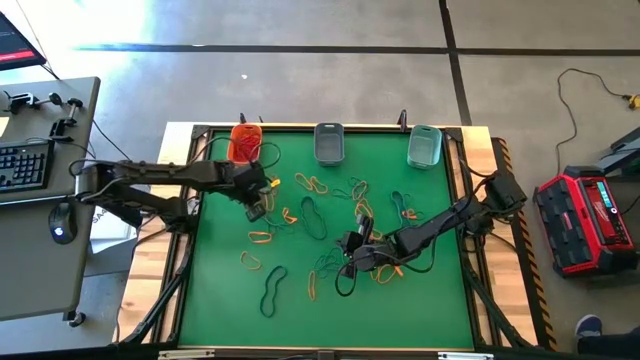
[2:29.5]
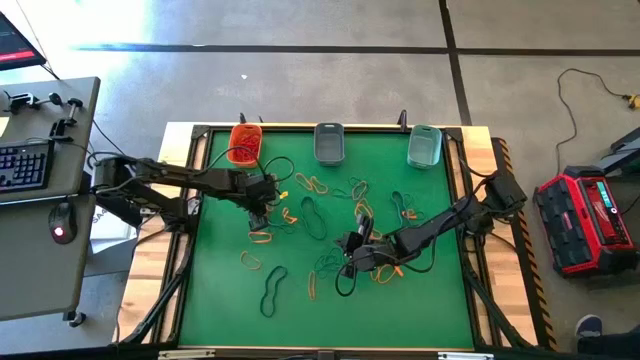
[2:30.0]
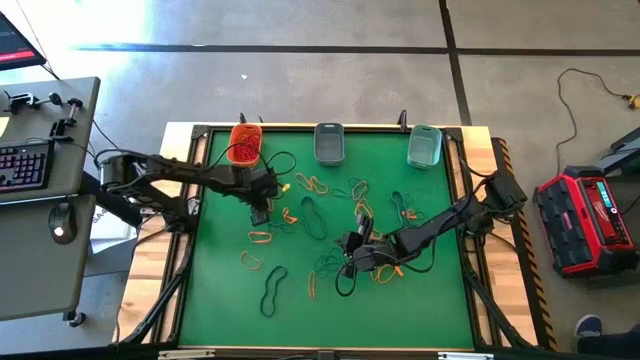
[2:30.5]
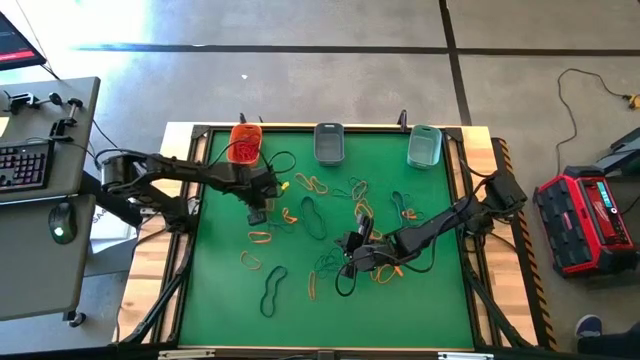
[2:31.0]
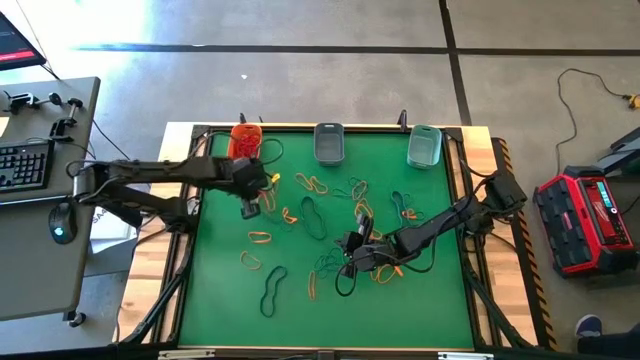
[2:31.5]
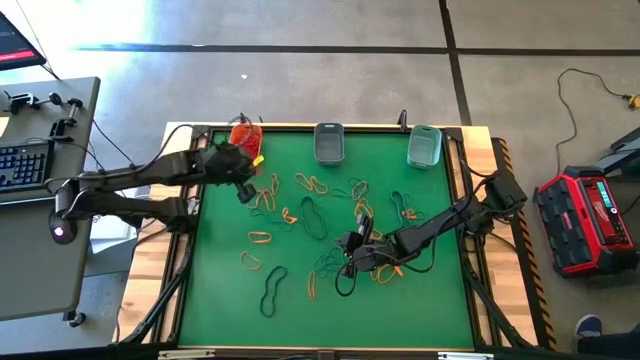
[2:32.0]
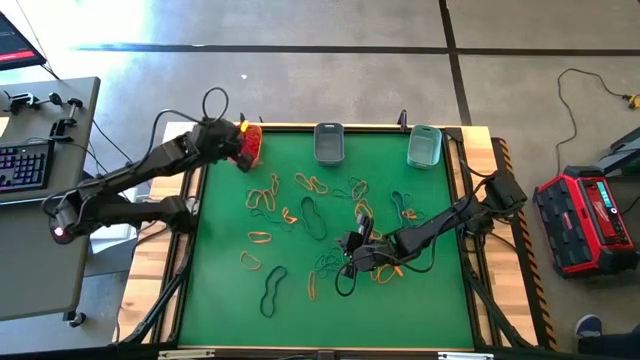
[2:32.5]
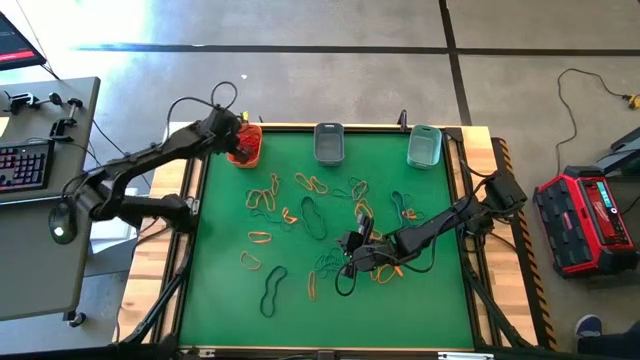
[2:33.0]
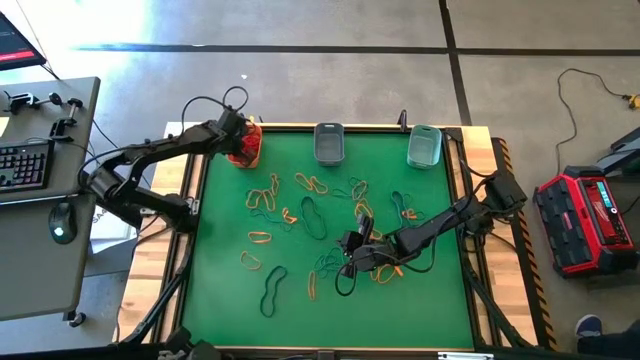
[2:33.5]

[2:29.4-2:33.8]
Task: Sort rubber bands into baskets
Put the red rubber band into the orange bin

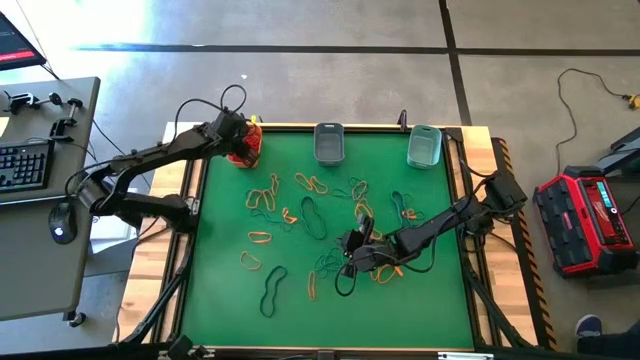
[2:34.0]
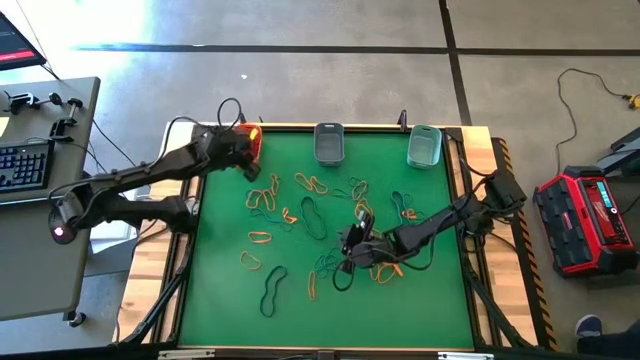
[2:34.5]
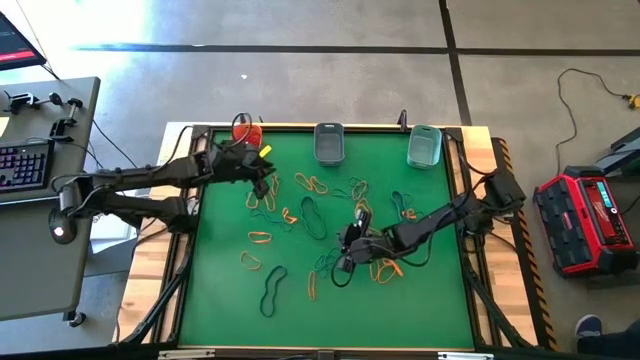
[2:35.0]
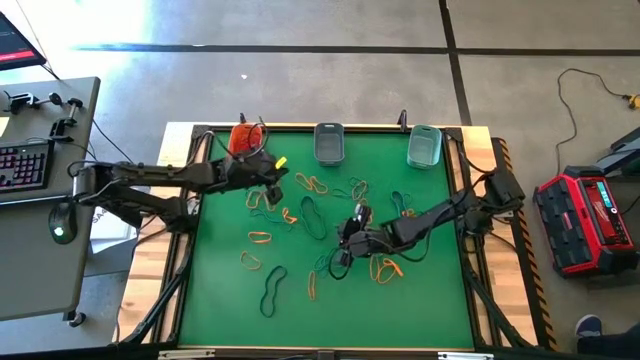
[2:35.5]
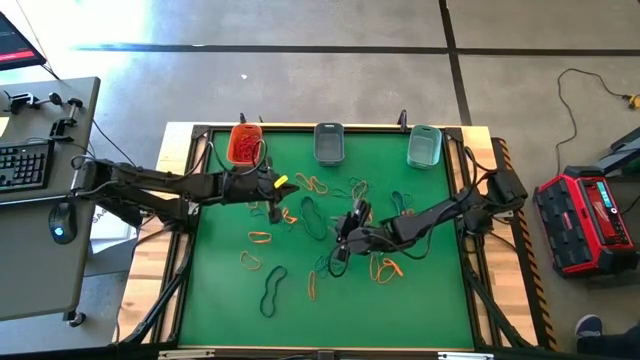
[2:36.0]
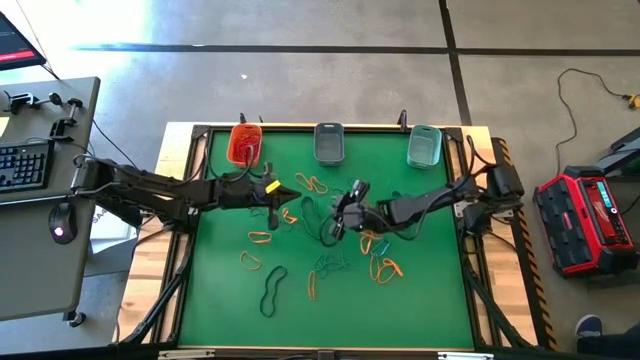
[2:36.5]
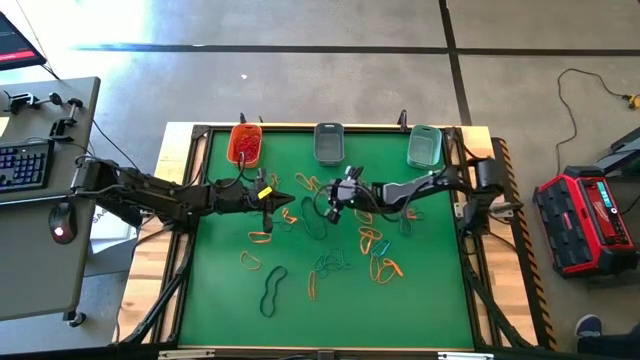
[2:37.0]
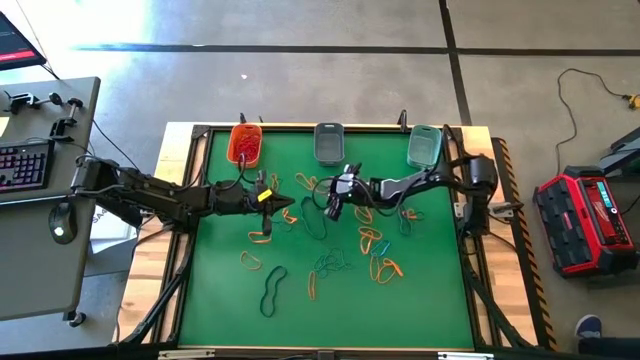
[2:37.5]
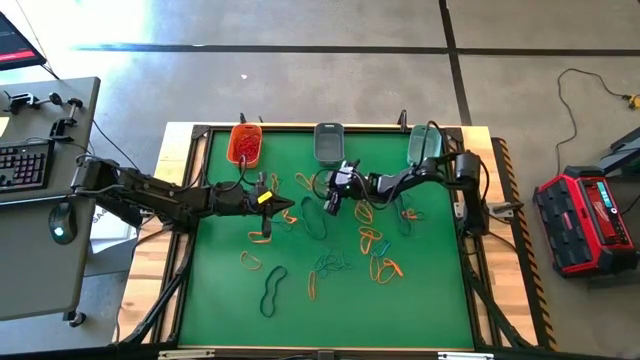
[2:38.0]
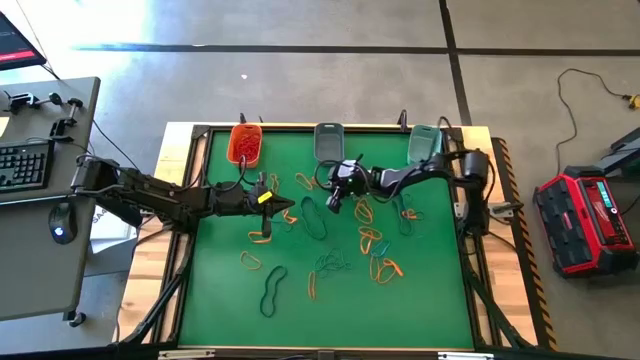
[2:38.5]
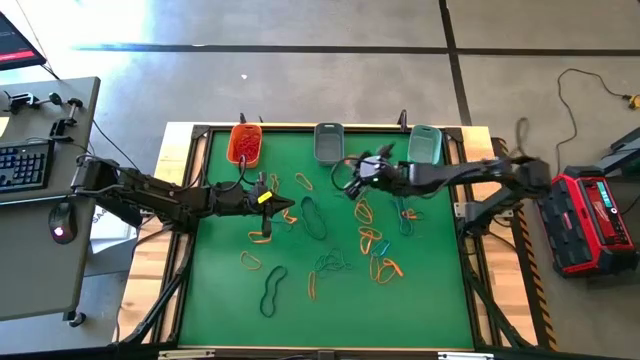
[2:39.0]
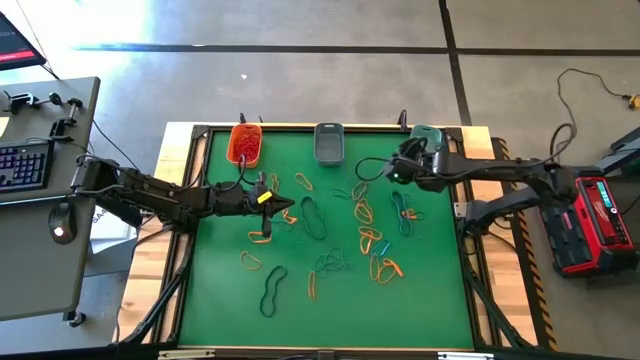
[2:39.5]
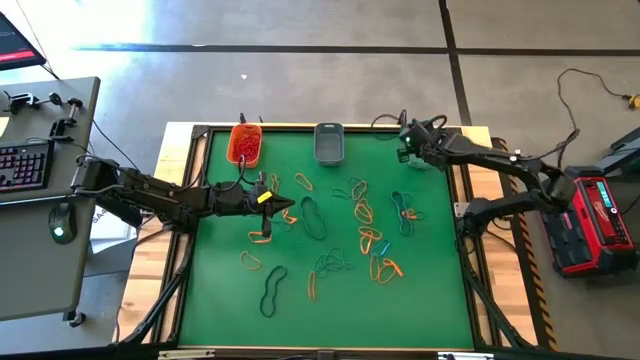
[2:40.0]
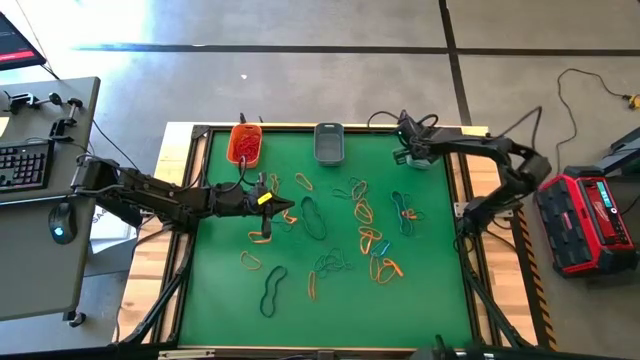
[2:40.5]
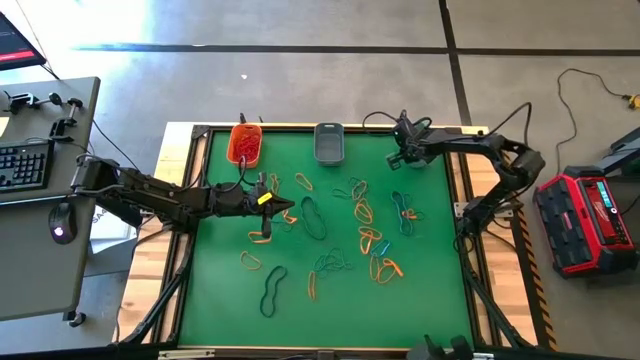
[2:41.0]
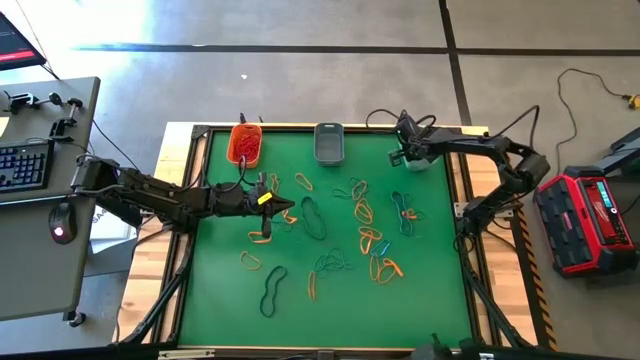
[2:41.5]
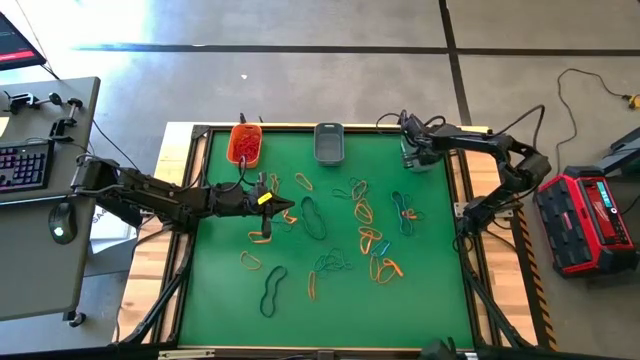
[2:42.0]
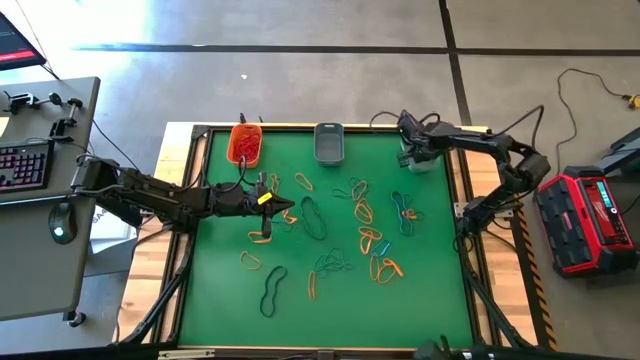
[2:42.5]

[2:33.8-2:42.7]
Put the orange rubber band into the green bin

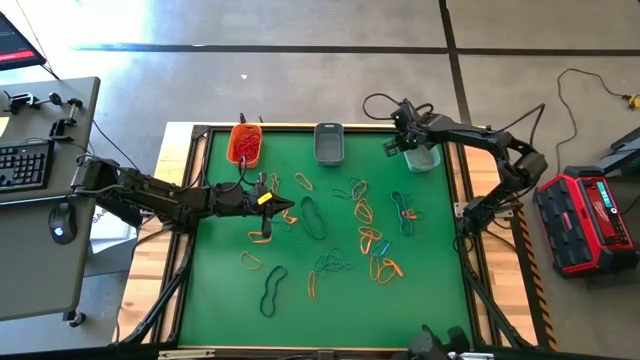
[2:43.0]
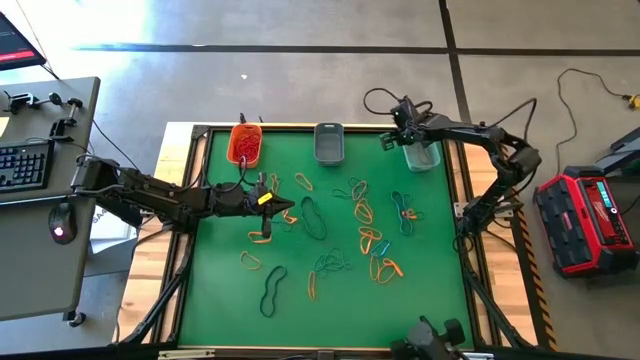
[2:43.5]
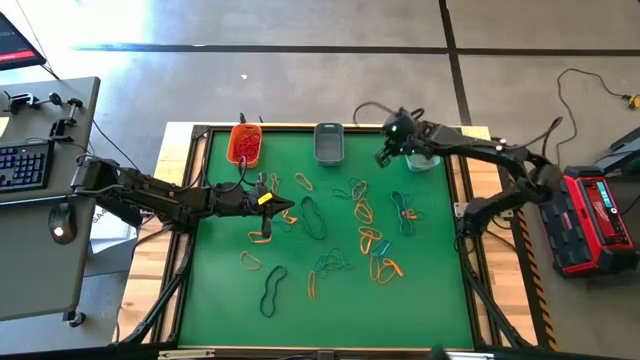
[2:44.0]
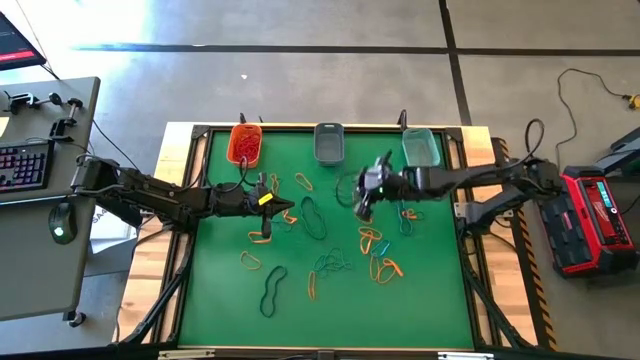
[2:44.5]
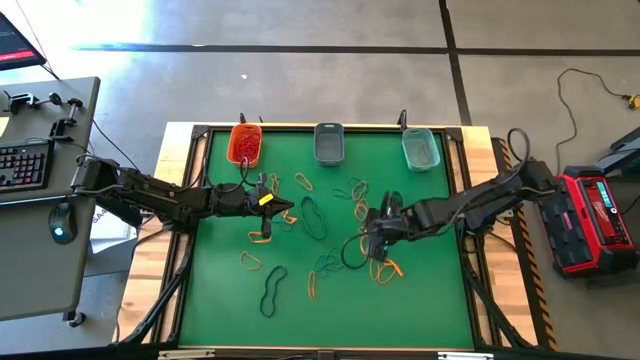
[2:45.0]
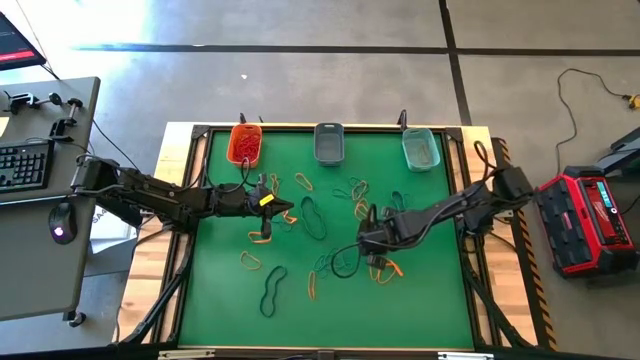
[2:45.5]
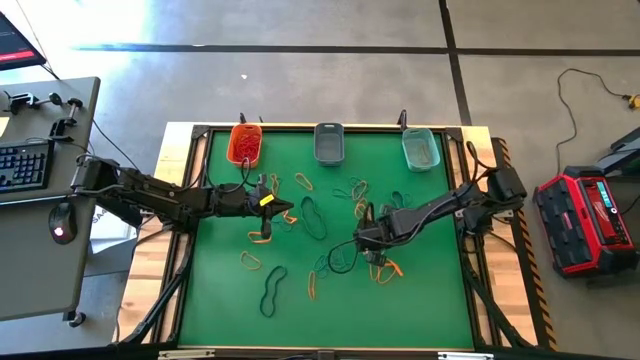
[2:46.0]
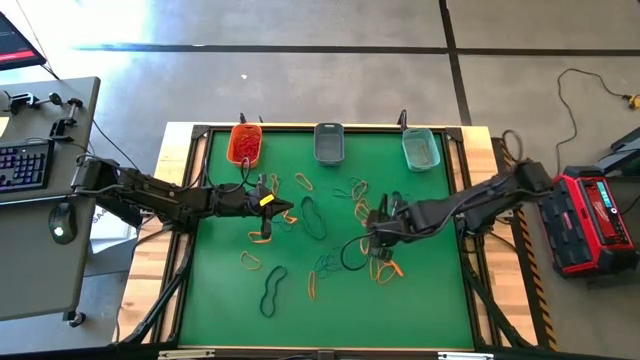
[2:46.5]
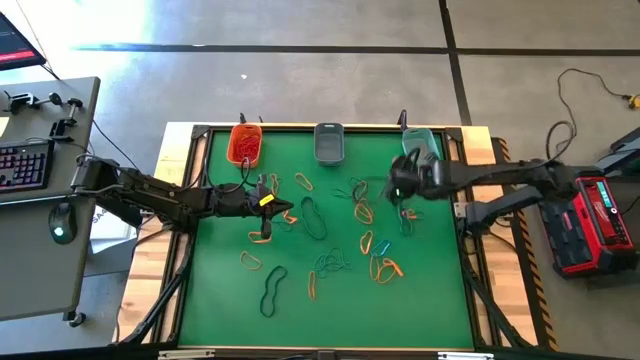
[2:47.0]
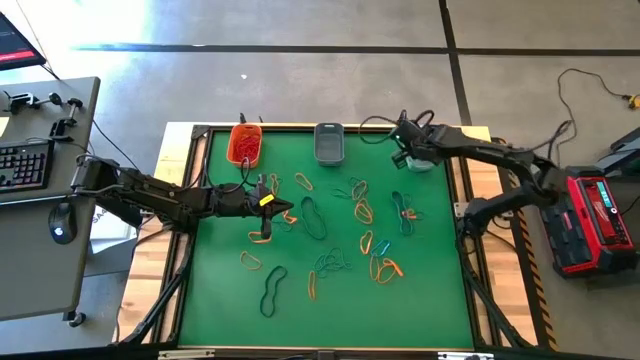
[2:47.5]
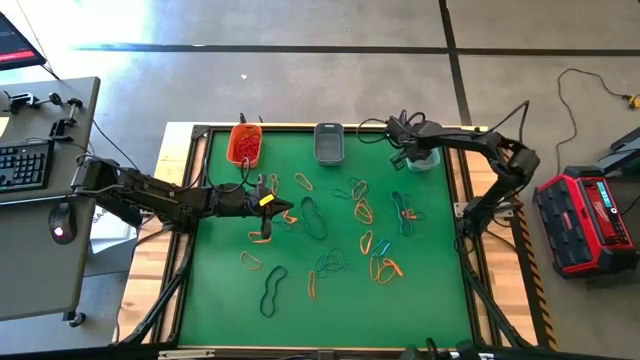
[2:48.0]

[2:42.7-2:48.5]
Put the orange rubber band into the green bin
